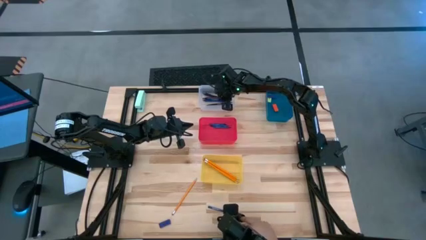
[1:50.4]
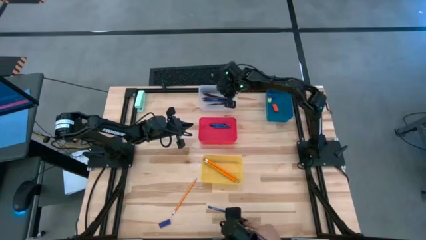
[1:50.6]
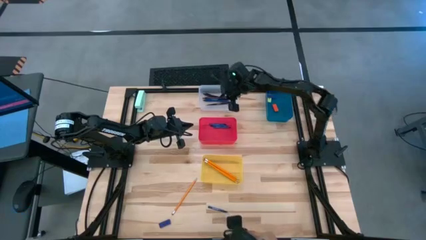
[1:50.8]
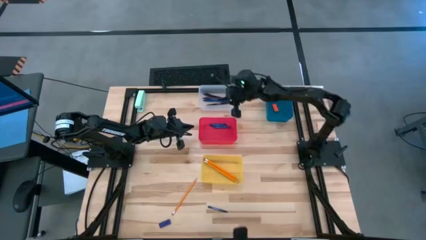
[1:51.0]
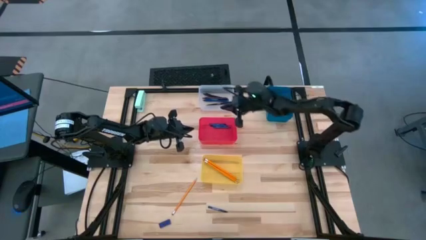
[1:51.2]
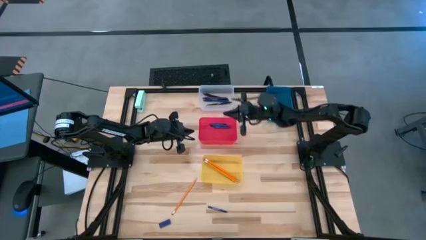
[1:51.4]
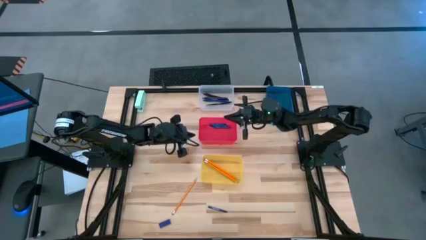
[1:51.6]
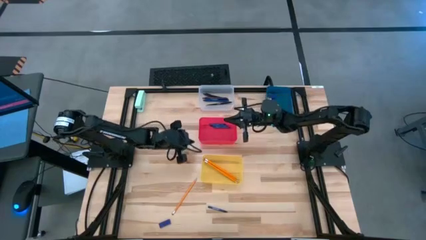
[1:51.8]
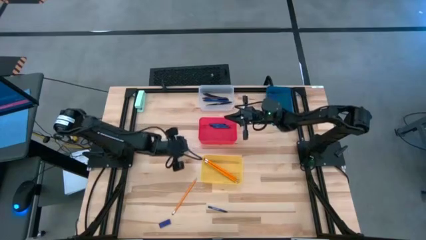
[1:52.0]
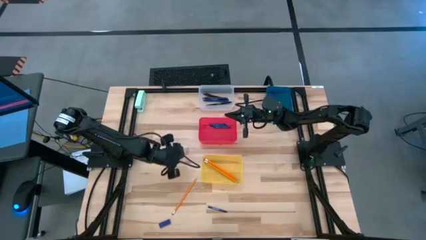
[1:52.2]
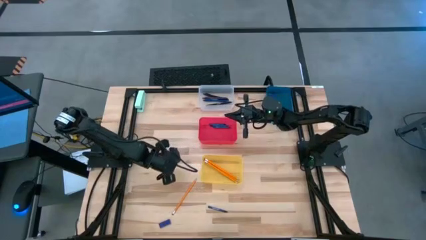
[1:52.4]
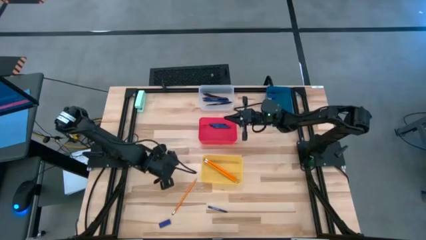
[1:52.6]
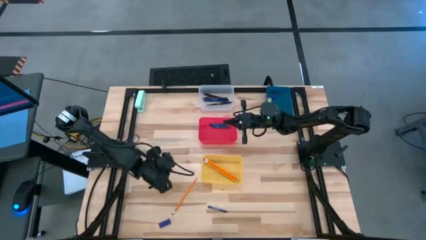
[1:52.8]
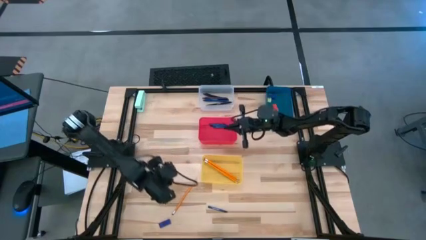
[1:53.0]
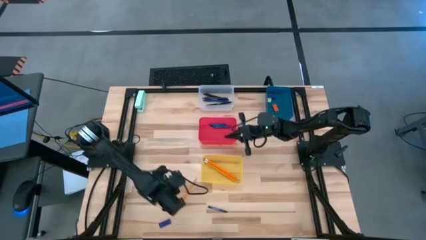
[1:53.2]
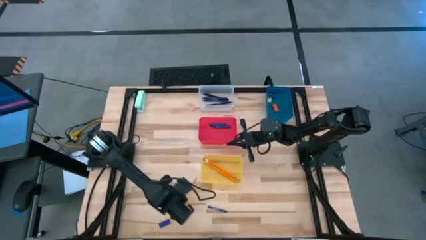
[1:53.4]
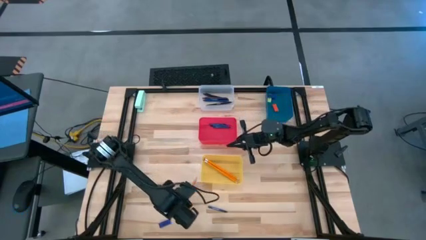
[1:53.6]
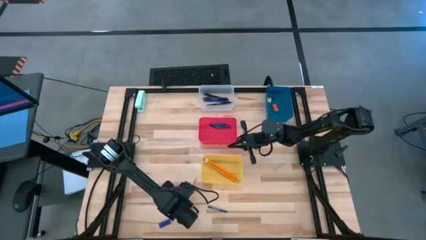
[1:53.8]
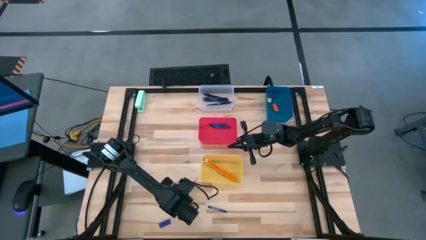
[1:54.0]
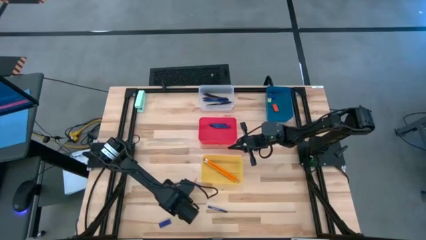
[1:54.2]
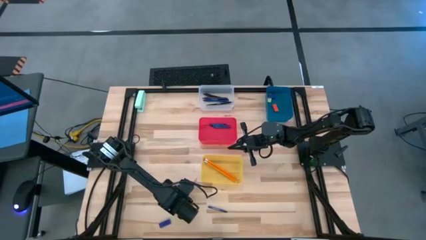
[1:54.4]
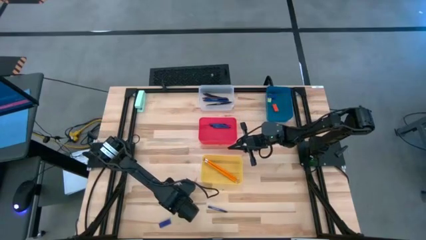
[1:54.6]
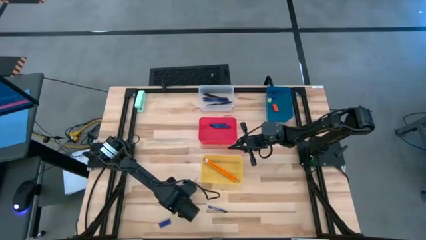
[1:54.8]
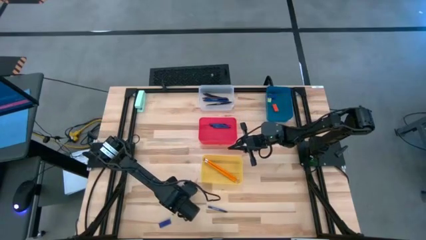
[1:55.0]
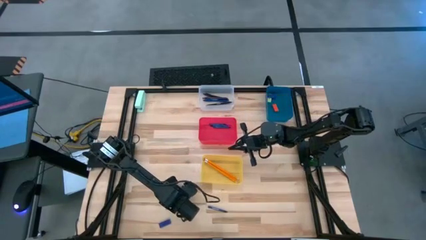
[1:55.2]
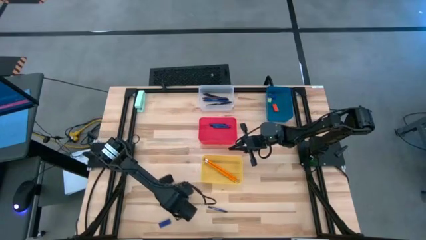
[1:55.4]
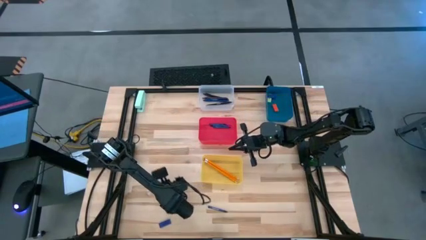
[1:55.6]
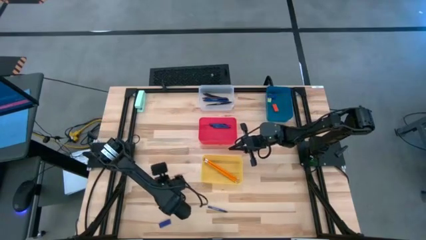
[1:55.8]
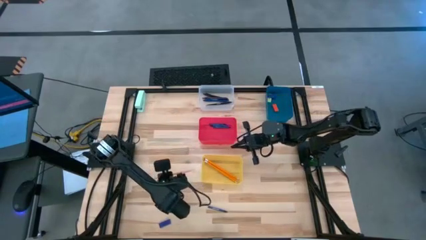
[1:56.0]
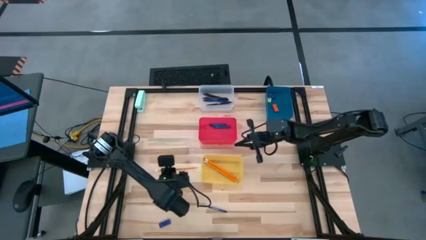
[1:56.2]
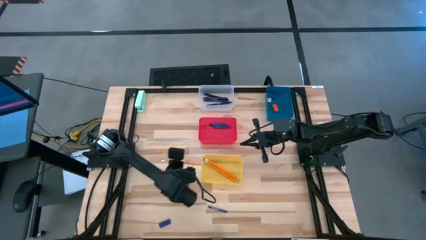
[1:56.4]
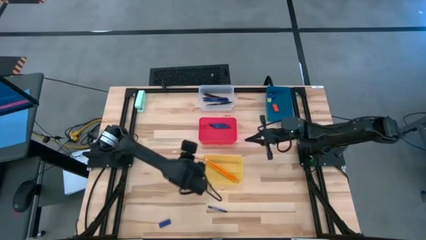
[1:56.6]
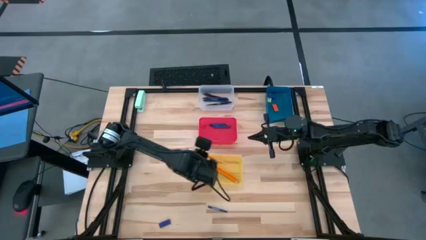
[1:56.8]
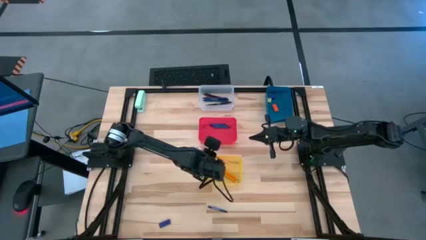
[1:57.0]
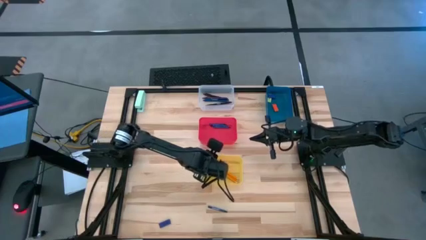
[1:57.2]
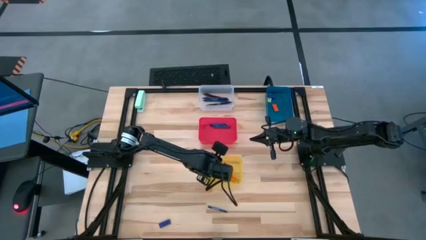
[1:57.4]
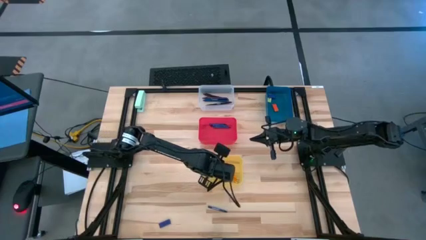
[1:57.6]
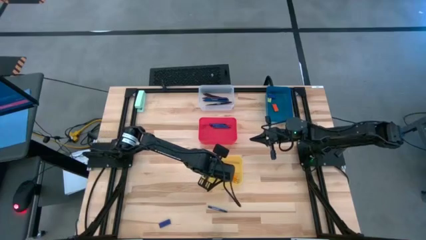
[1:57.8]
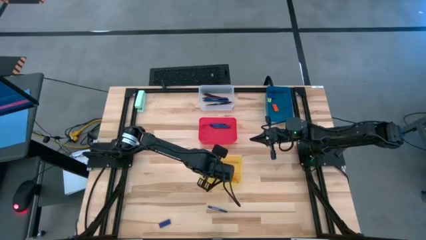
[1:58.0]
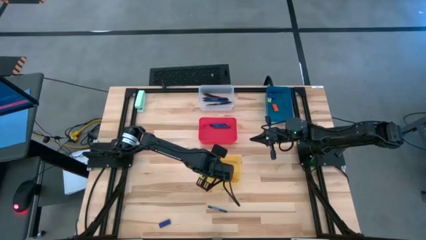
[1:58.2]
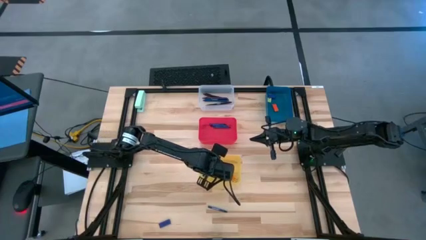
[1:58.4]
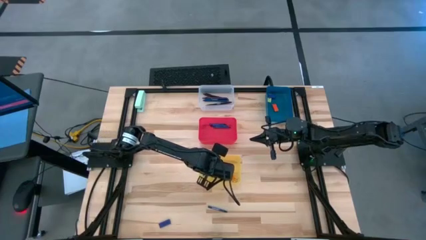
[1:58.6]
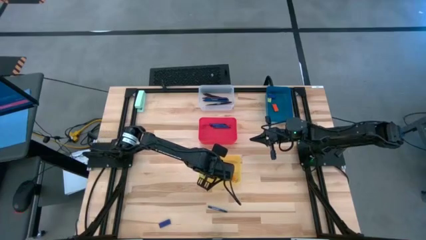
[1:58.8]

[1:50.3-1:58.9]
Task: Sort crayons/erasers/pens/pencils in bins
Put the orange pencil into the yellow bin

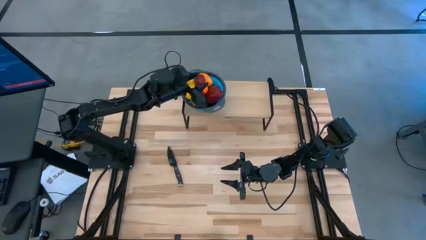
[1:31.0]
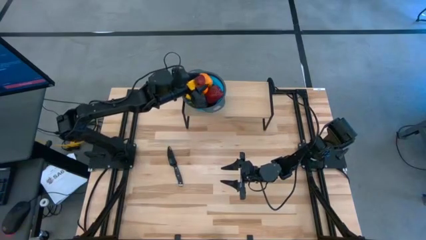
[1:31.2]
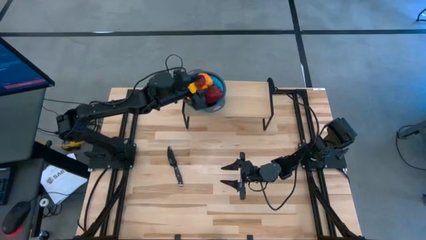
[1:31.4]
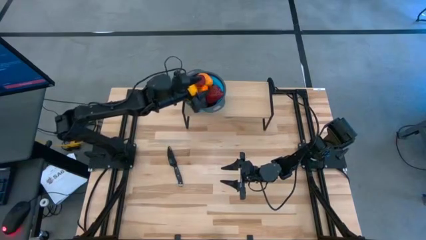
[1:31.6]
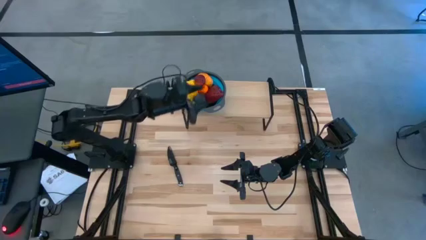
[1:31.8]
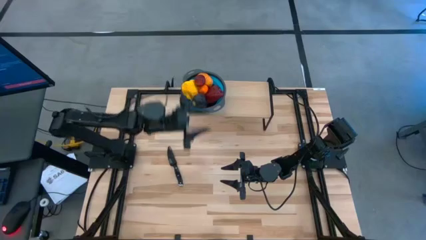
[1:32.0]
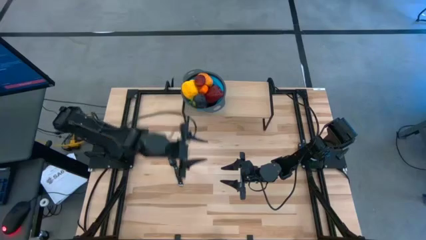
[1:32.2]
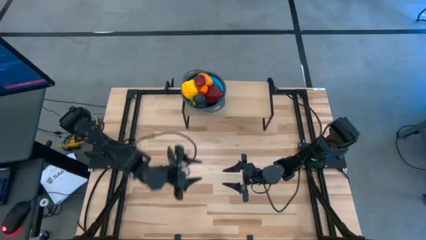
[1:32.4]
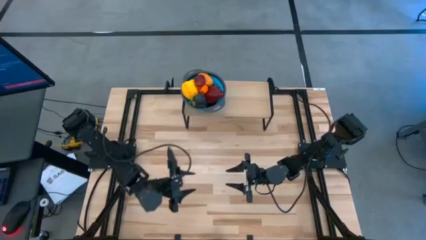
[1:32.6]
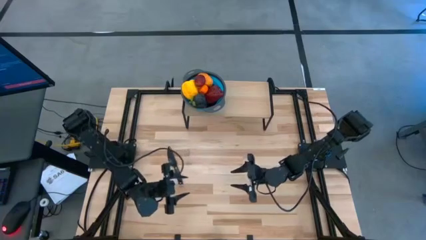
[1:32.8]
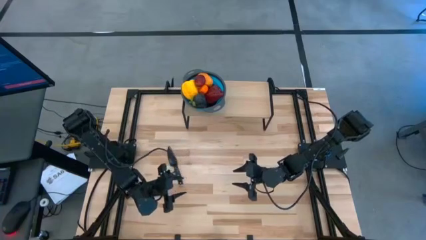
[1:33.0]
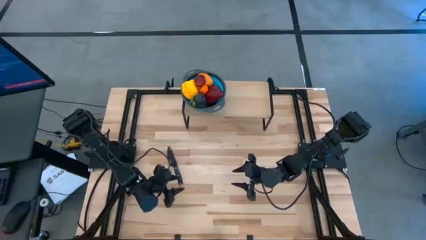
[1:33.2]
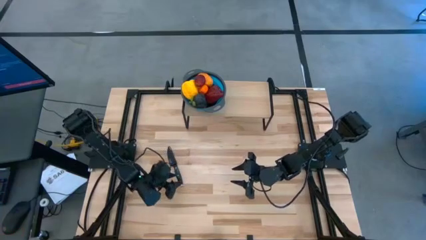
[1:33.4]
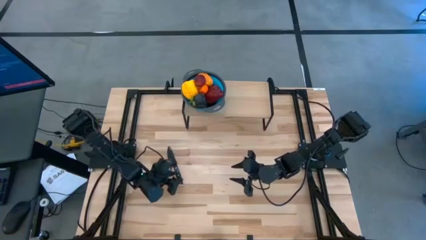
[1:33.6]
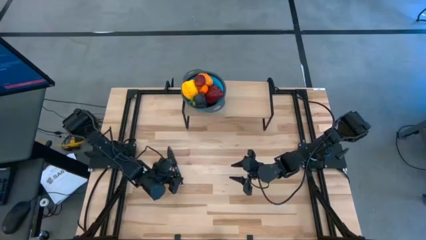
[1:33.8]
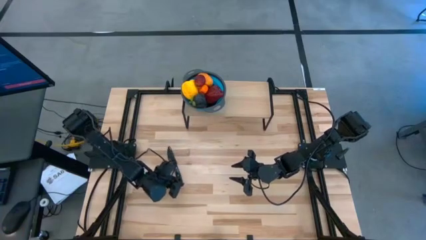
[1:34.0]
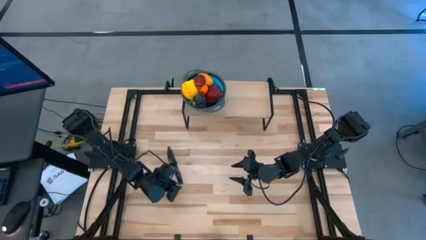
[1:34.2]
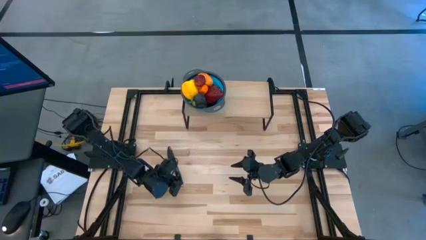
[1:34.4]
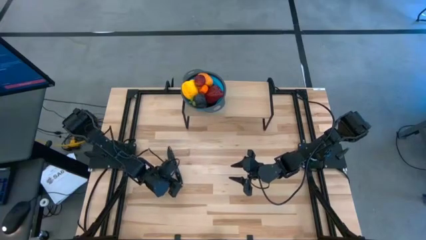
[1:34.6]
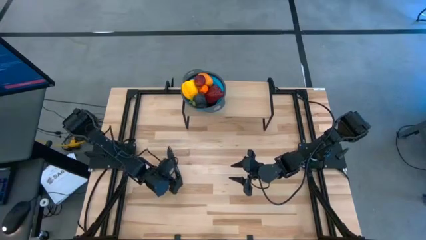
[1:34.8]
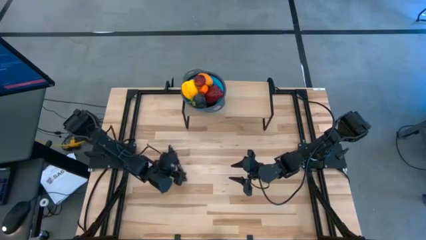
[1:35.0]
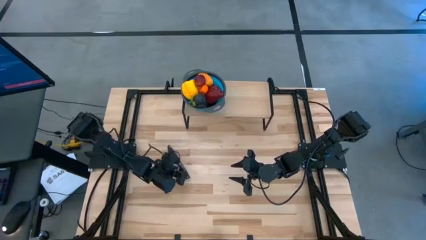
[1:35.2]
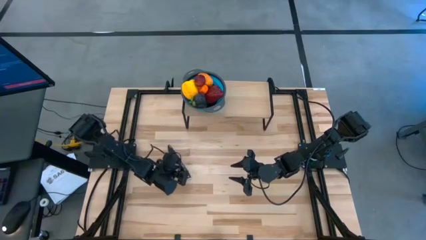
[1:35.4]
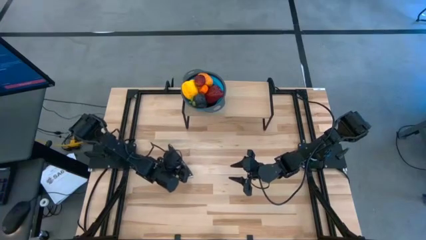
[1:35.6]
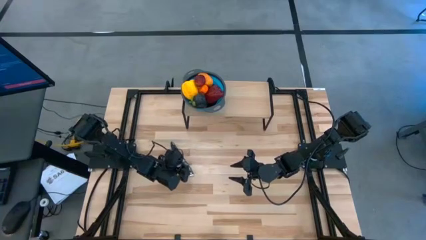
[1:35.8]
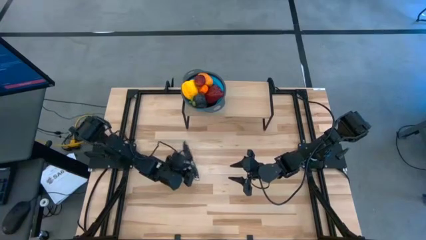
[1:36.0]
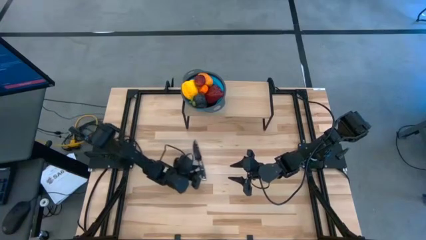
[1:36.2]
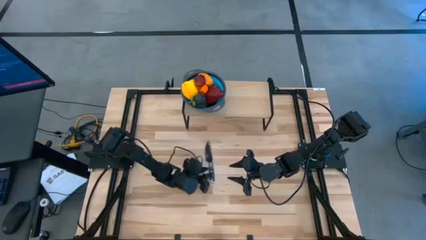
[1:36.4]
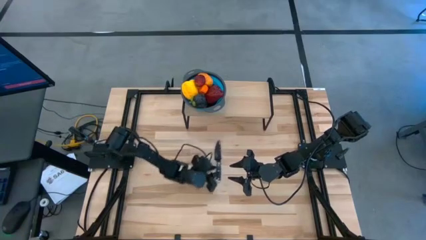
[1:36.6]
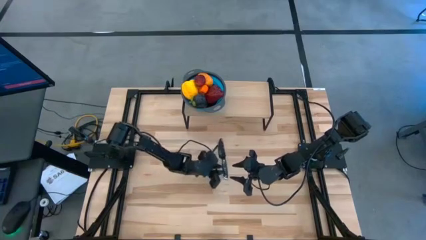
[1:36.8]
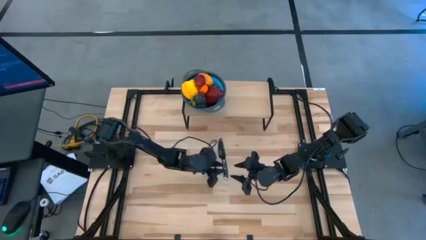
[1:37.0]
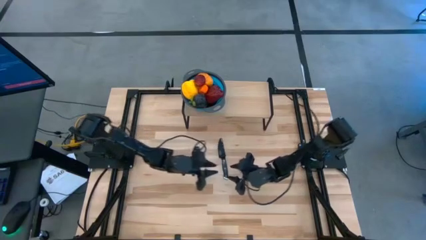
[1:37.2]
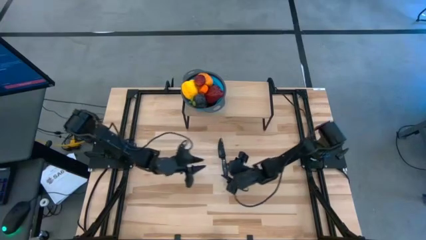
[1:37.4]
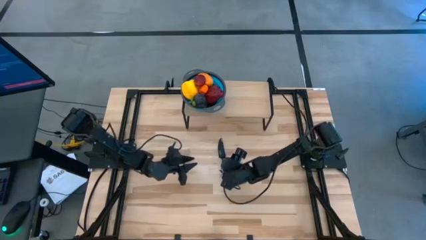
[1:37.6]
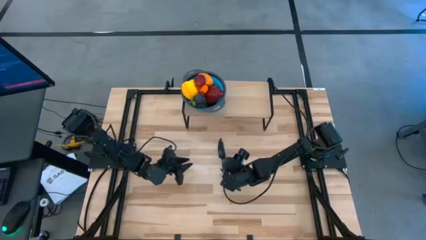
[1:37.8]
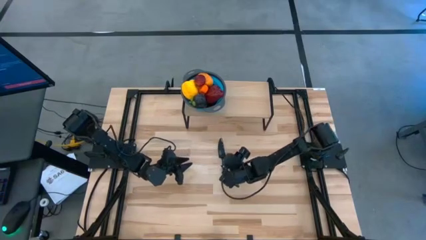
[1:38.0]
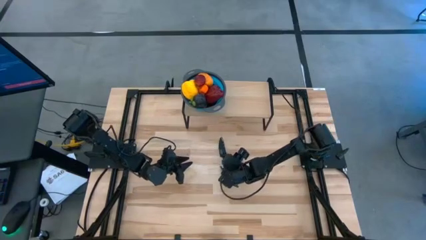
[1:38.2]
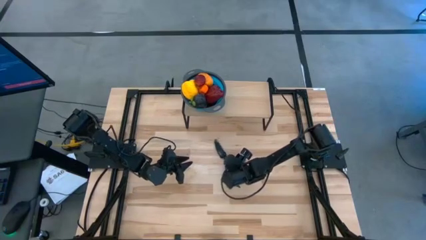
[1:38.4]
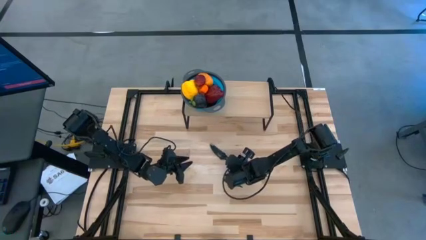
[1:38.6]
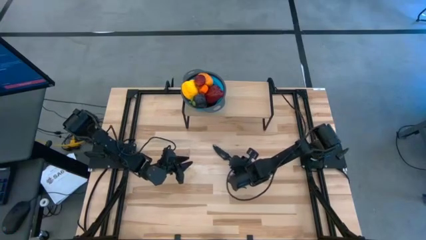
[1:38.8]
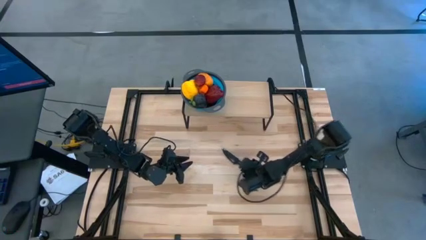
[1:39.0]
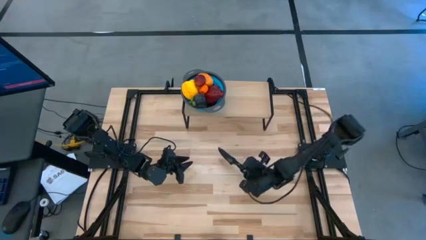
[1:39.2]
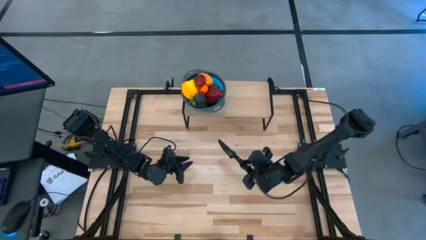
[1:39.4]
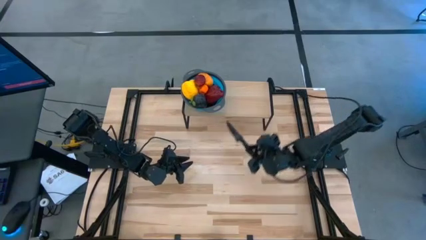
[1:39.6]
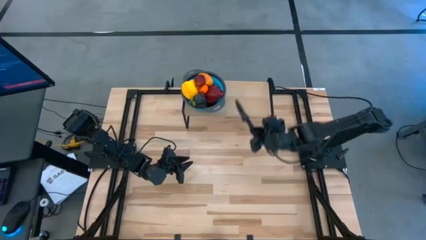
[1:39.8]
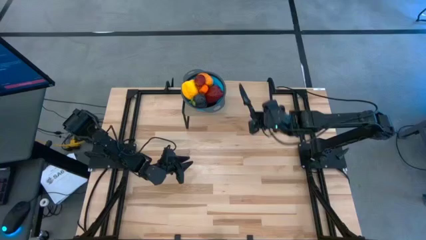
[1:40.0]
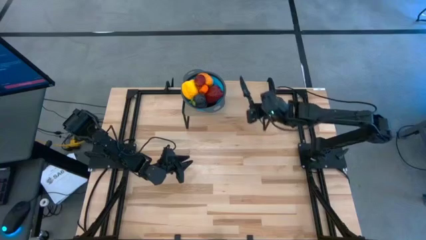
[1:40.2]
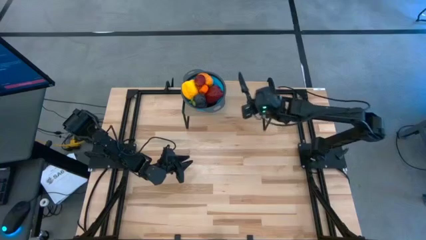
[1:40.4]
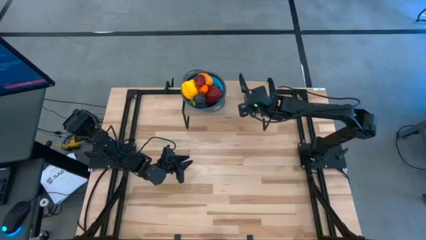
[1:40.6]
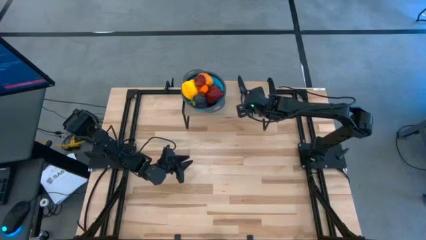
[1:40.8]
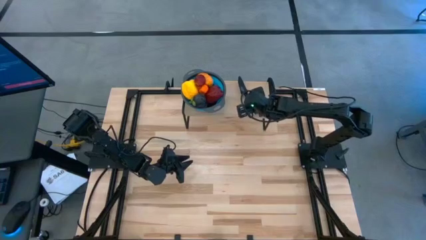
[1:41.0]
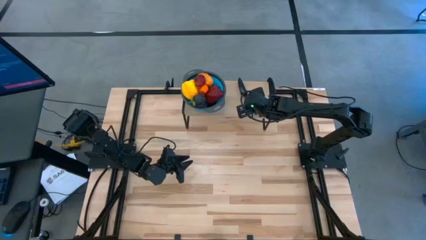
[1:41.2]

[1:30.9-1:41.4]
Task: Pick & Place Fruit
Put the kitchen knife on the shelf
